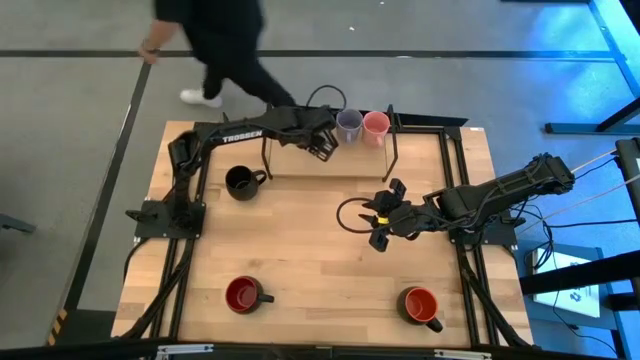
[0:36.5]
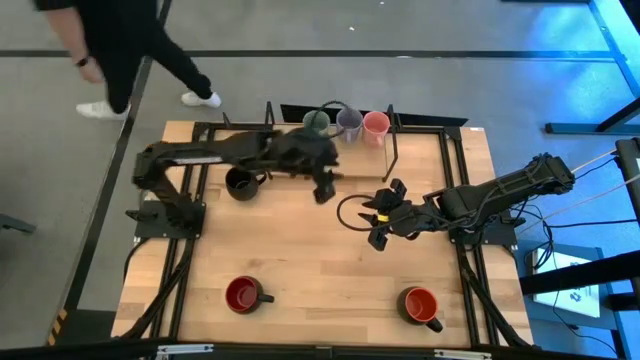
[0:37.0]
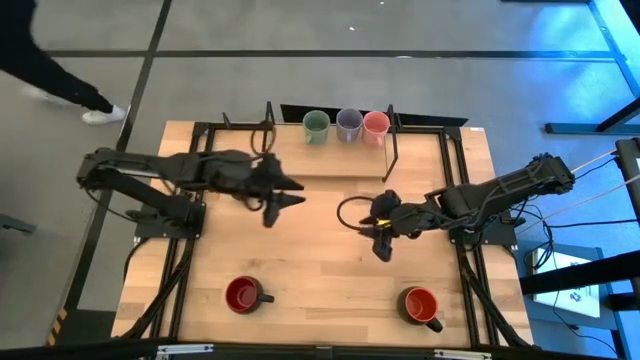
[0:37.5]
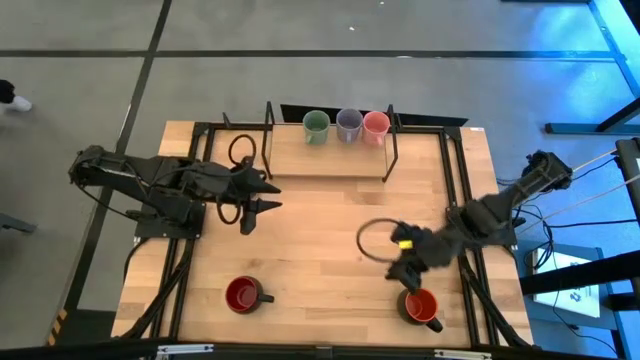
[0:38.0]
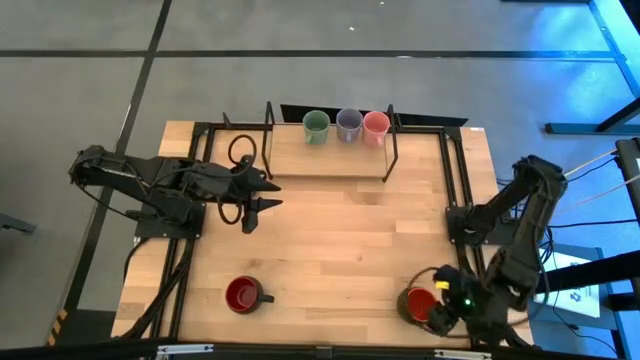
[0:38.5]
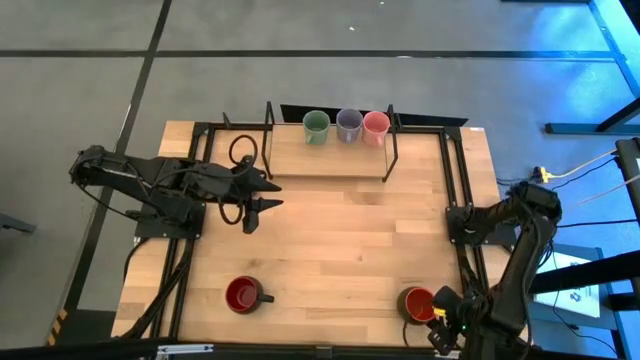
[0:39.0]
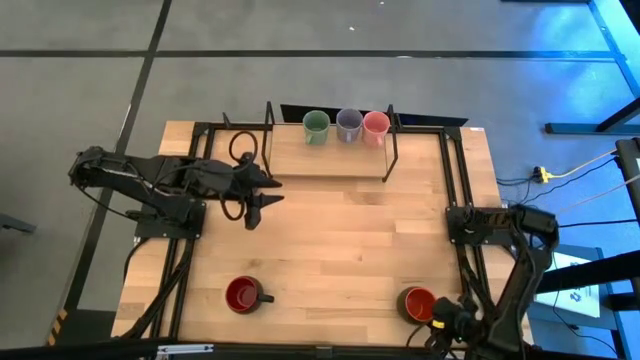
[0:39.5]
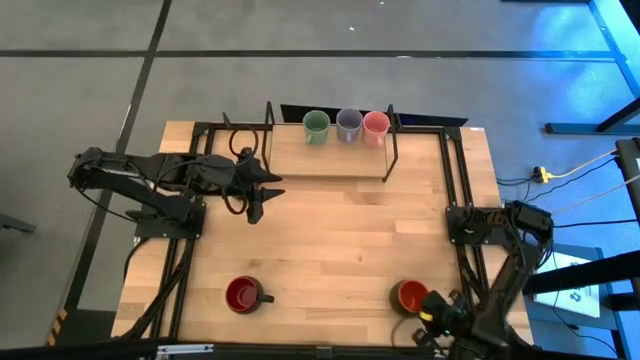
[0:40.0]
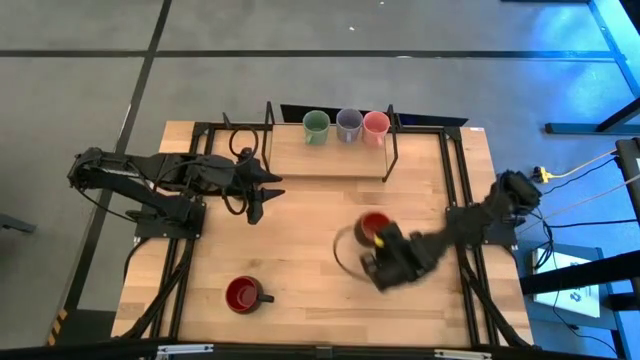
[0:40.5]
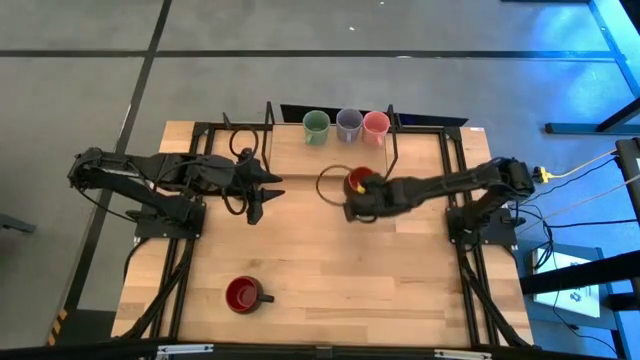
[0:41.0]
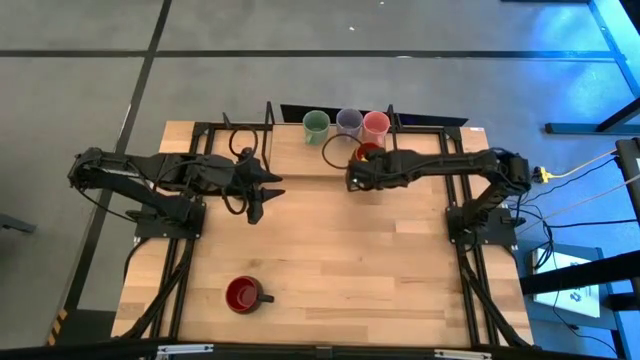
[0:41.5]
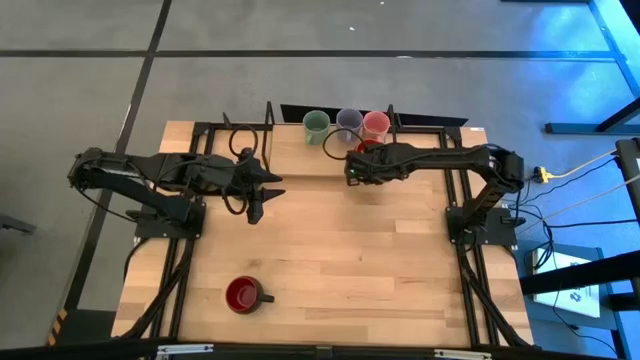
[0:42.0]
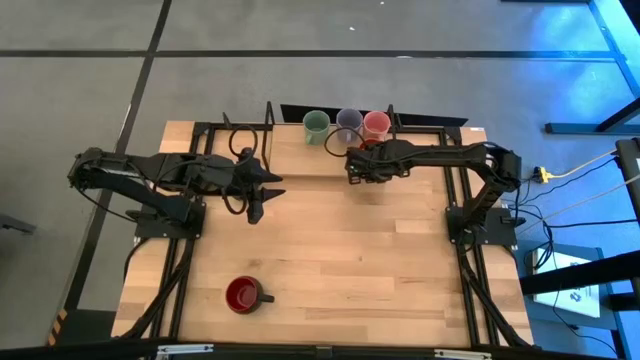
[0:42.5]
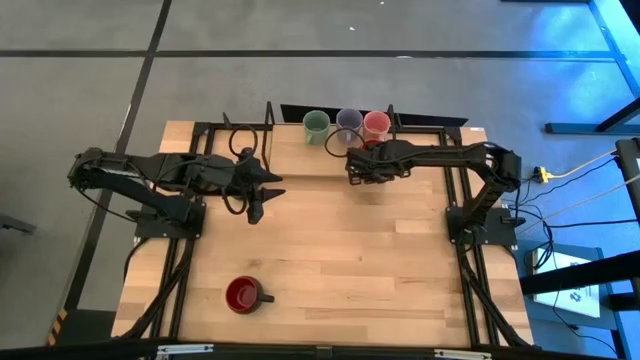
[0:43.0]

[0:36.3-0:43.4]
Task: Place coffee mugs
Put the black orange color mug on the shelf

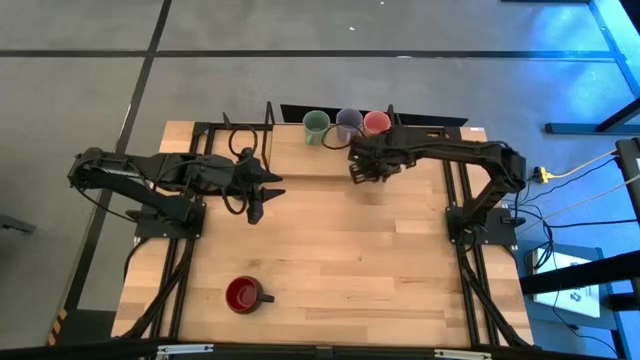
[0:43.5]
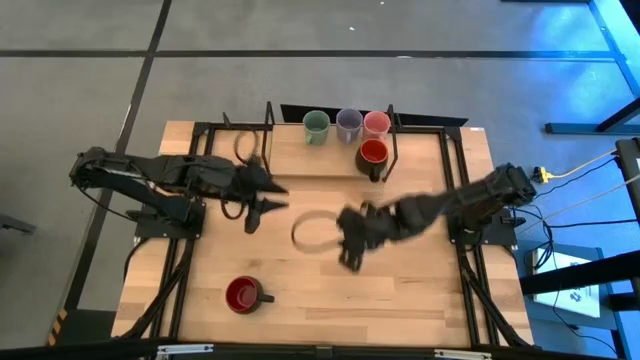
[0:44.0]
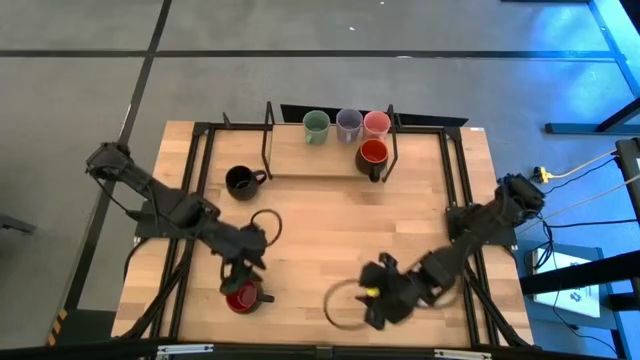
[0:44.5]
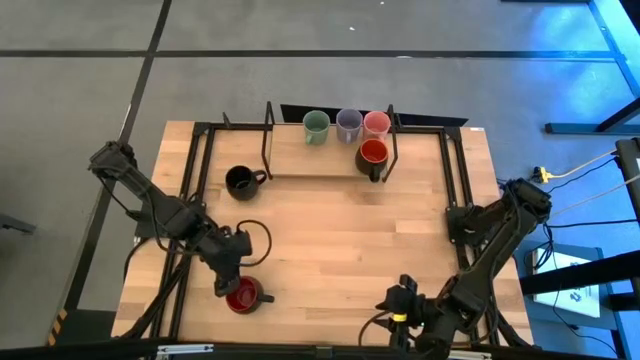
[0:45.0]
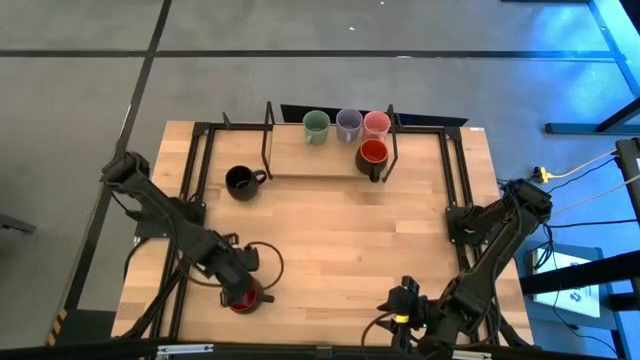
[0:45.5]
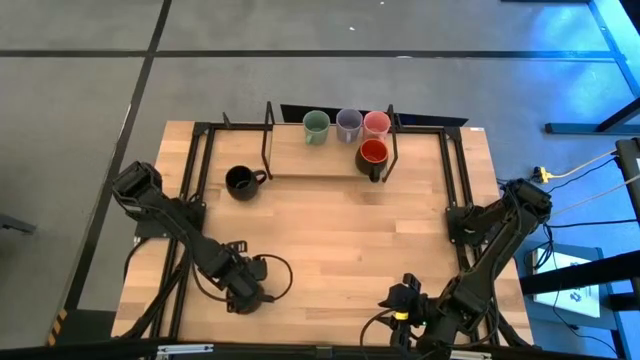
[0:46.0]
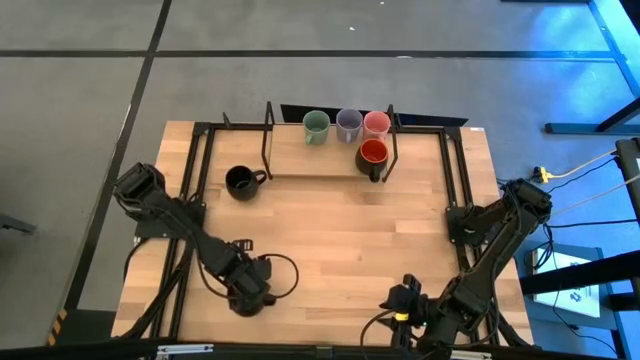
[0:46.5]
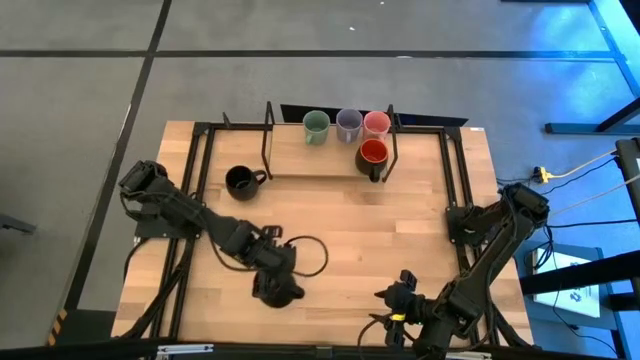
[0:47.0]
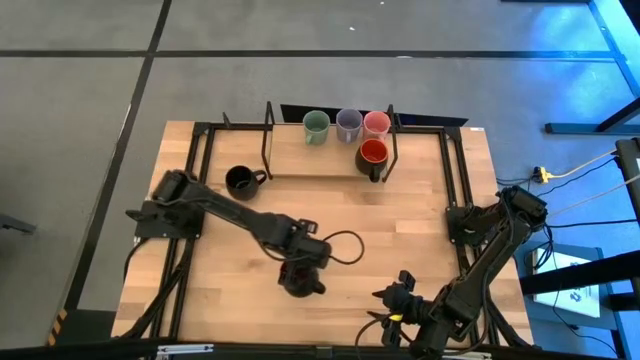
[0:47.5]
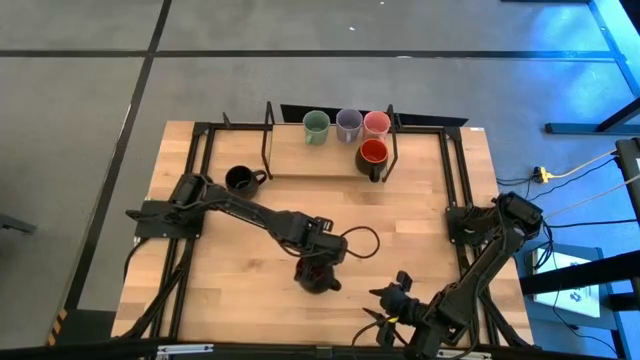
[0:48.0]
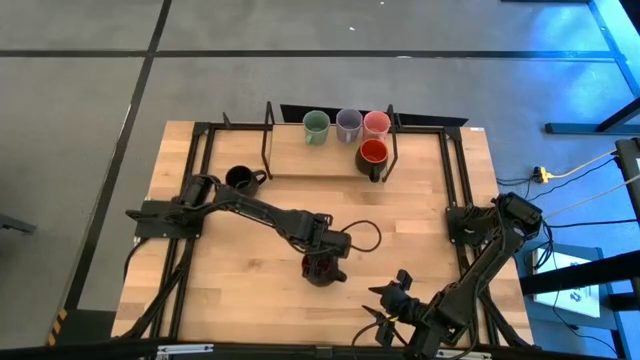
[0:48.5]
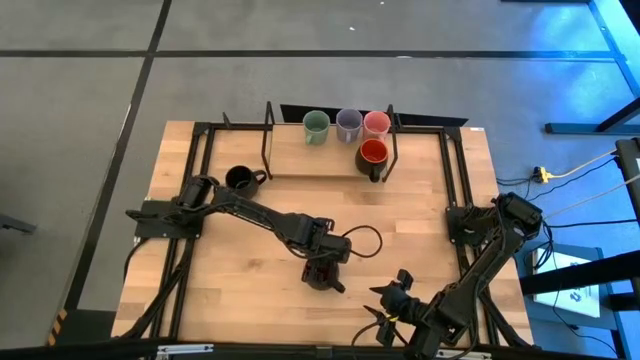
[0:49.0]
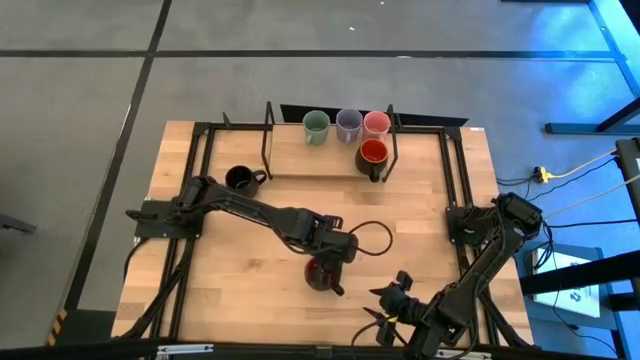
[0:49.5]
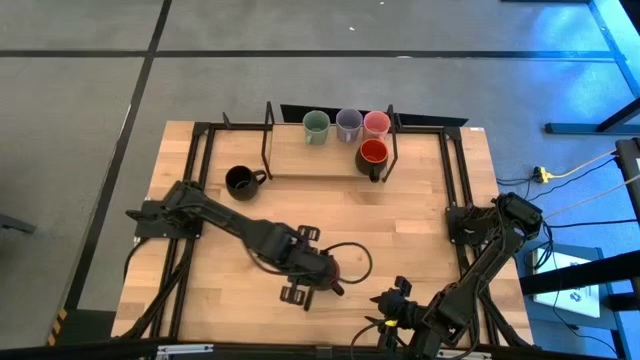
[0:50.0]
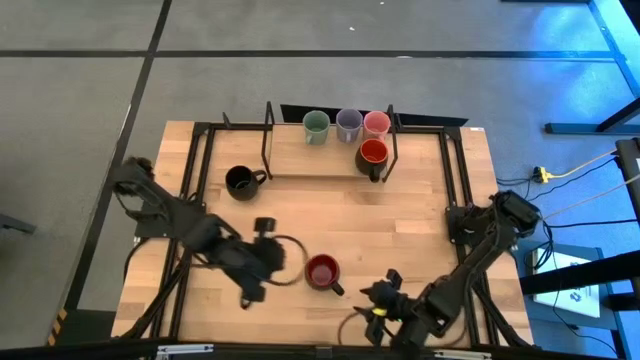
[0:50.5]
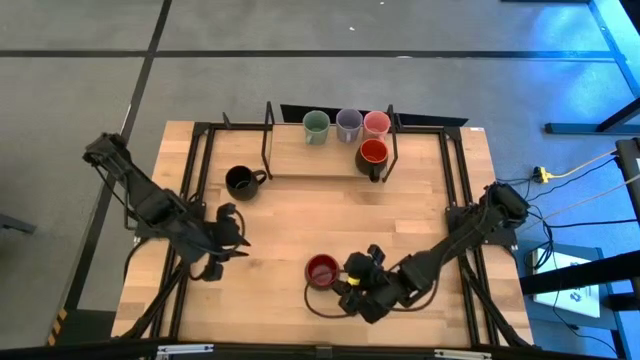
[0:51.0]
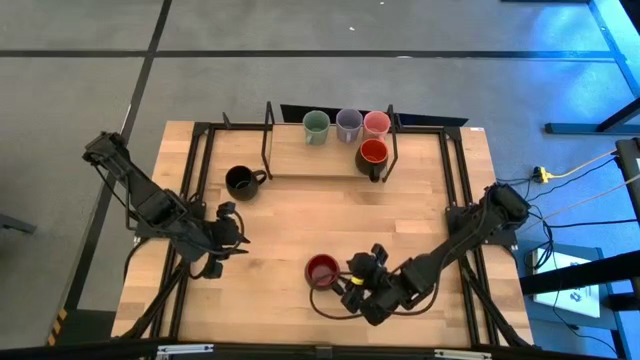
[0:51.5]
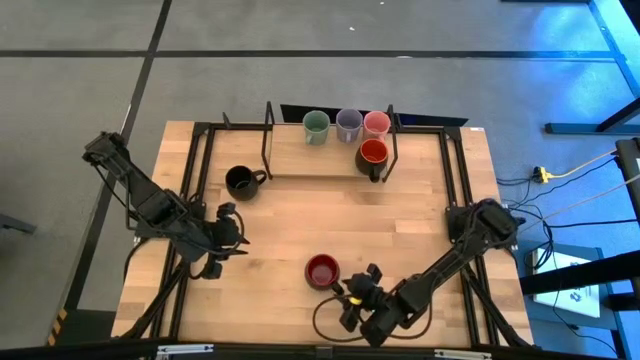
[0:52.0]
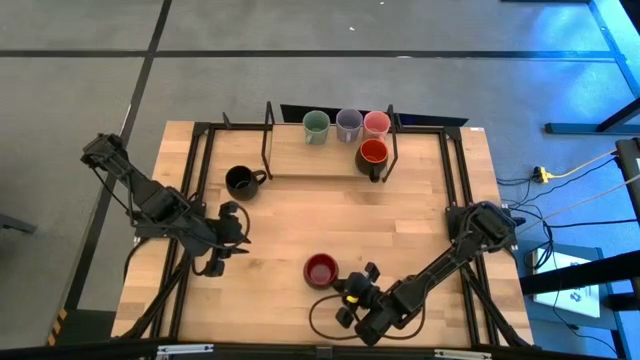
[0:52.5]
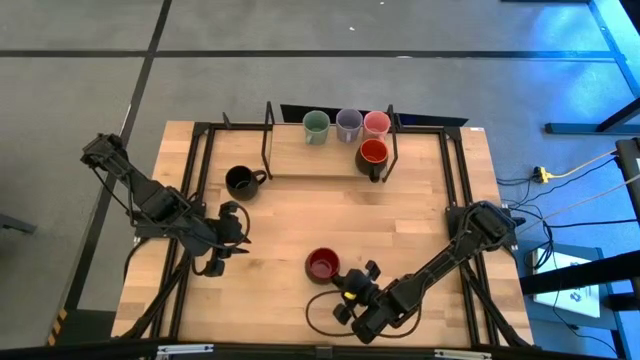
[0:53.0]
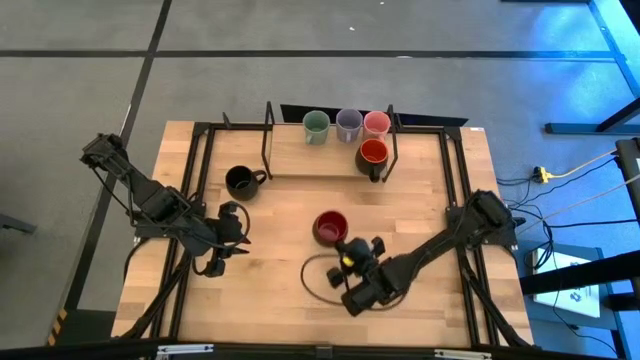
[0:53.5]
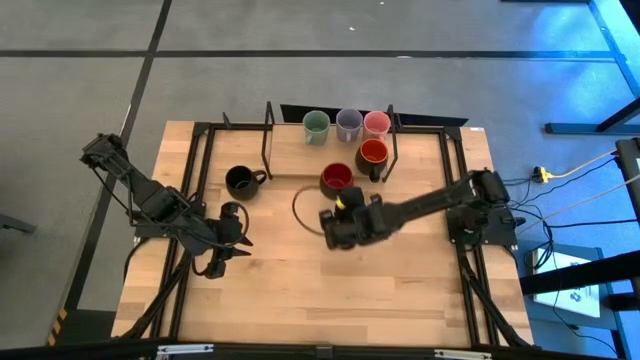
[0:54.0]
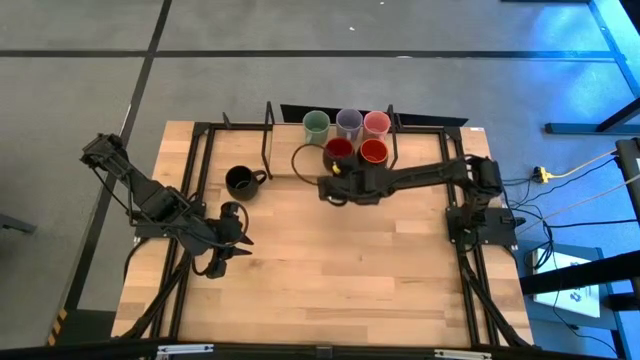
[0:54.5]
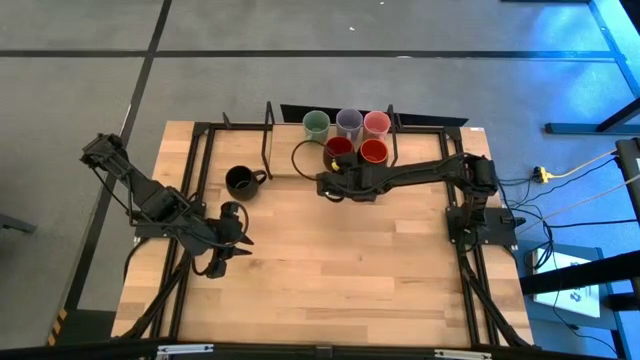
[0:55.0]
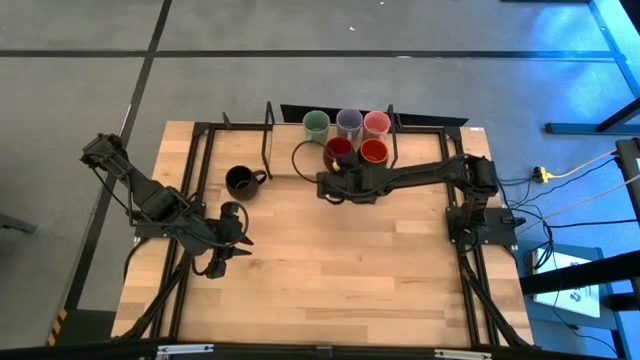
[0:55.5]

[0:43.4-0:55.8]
Put the black red color mug on the shelf
